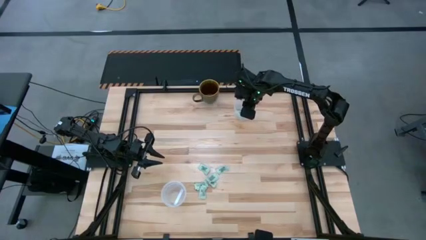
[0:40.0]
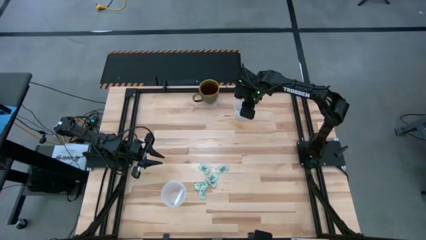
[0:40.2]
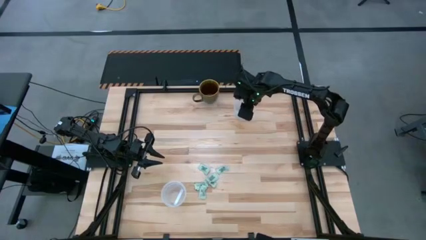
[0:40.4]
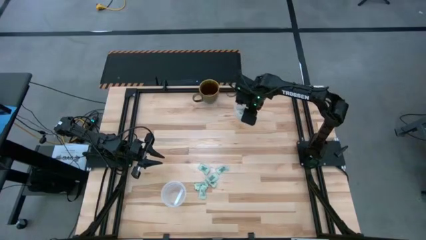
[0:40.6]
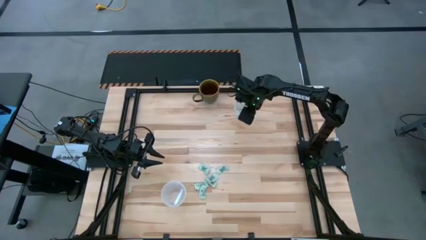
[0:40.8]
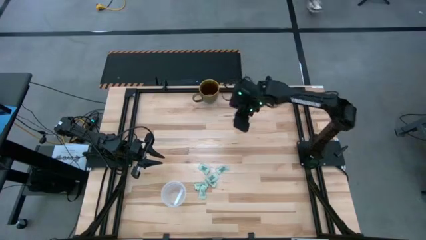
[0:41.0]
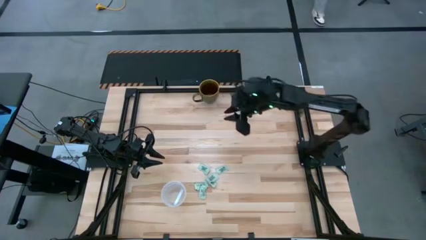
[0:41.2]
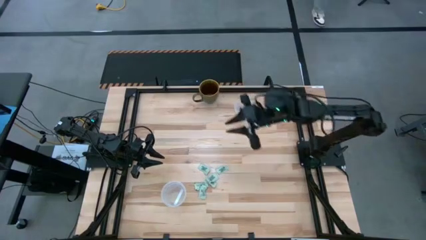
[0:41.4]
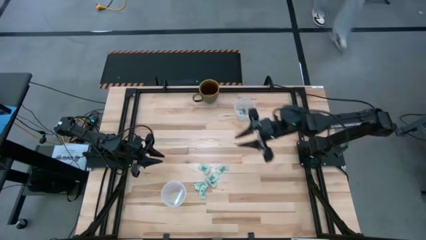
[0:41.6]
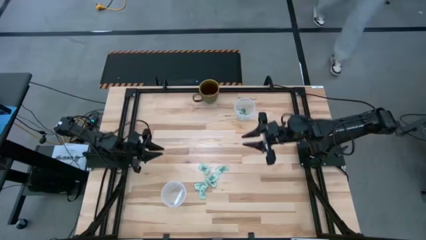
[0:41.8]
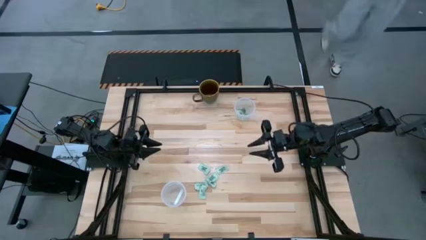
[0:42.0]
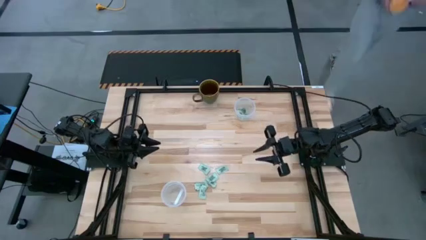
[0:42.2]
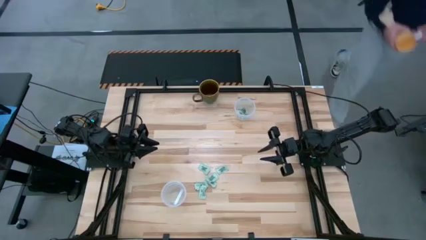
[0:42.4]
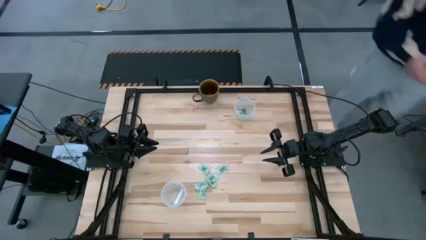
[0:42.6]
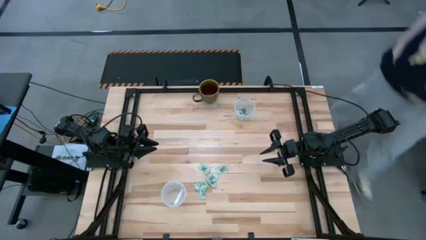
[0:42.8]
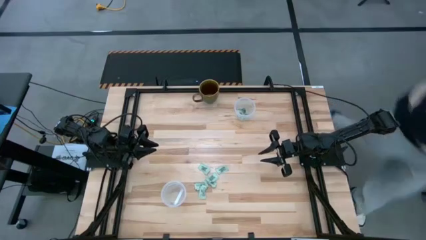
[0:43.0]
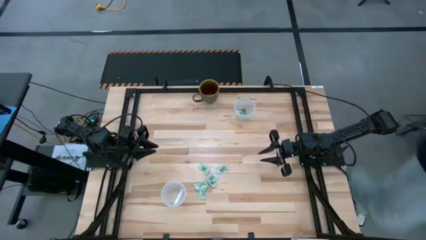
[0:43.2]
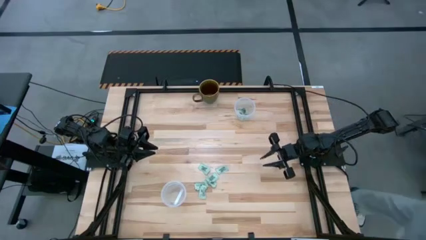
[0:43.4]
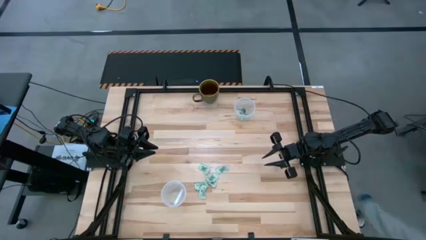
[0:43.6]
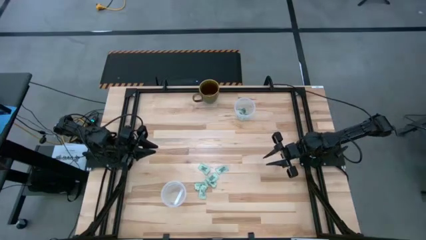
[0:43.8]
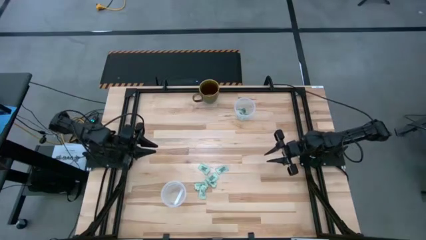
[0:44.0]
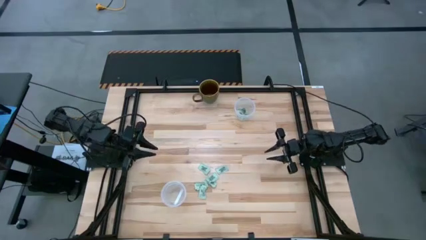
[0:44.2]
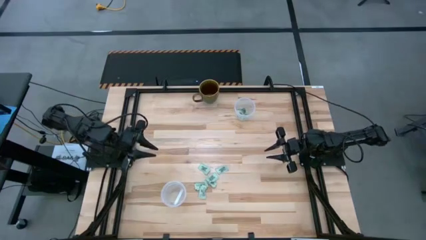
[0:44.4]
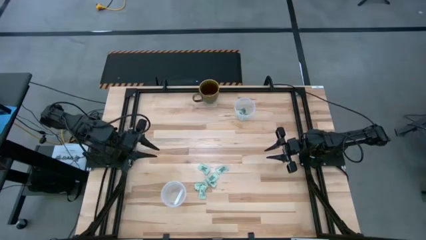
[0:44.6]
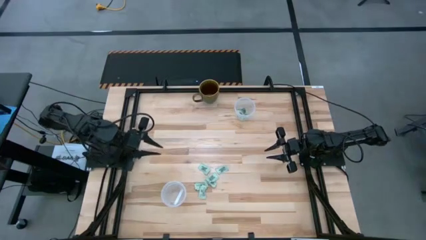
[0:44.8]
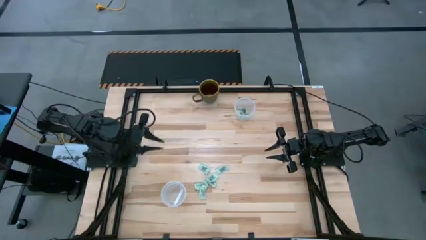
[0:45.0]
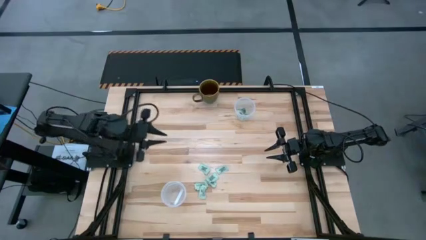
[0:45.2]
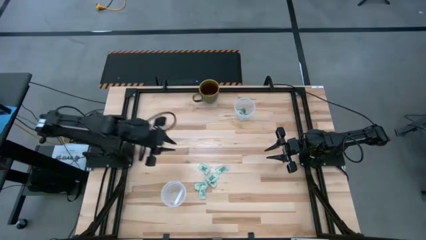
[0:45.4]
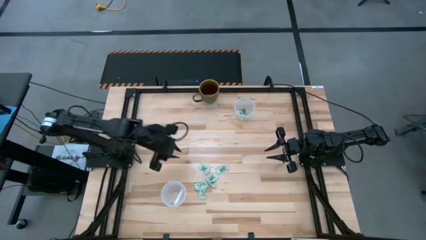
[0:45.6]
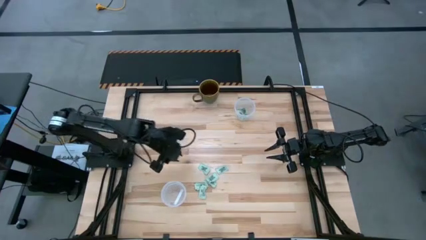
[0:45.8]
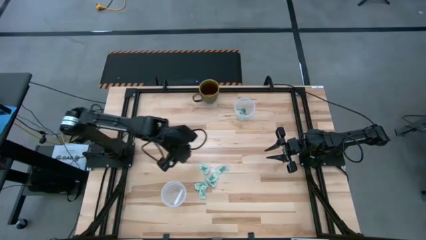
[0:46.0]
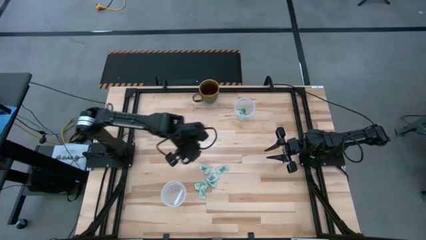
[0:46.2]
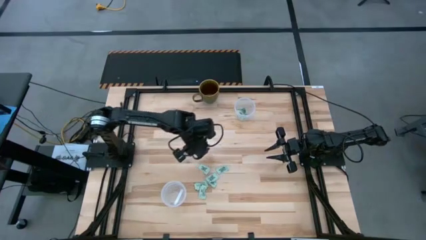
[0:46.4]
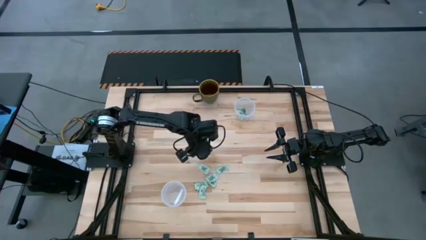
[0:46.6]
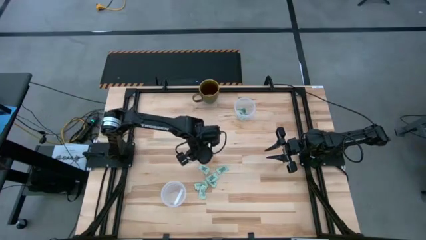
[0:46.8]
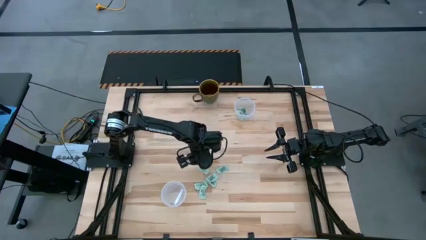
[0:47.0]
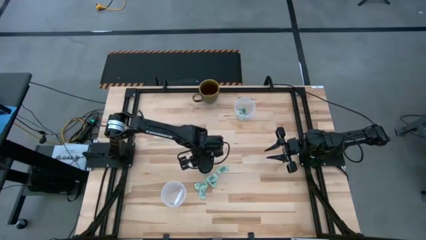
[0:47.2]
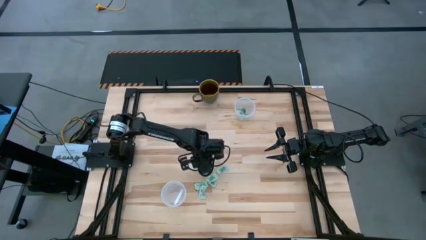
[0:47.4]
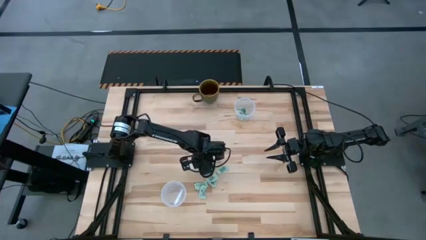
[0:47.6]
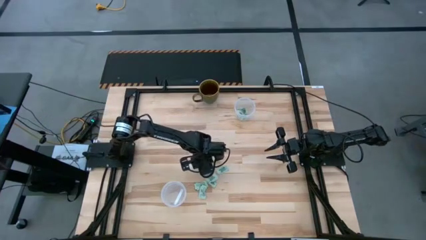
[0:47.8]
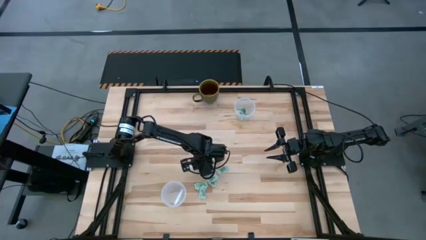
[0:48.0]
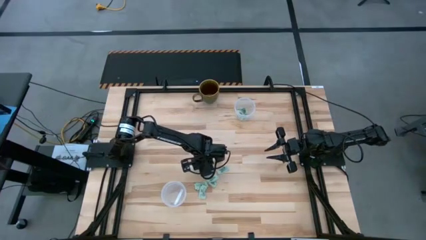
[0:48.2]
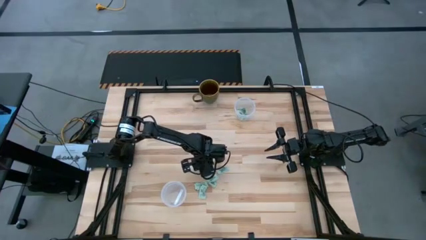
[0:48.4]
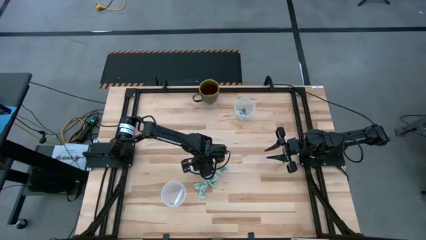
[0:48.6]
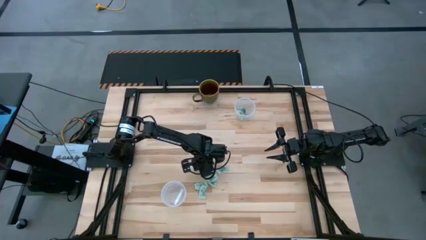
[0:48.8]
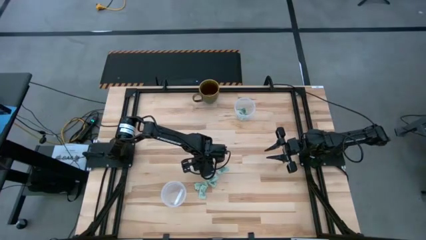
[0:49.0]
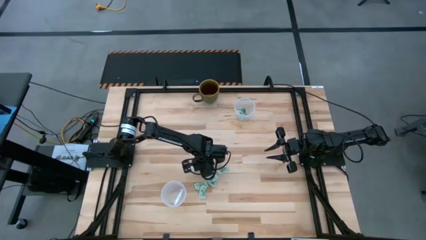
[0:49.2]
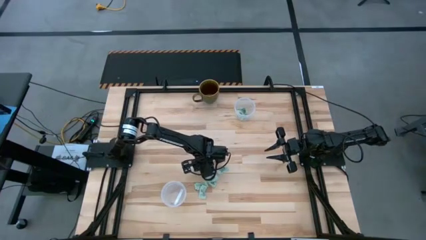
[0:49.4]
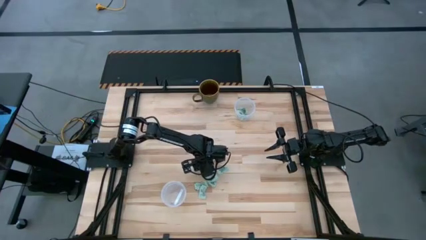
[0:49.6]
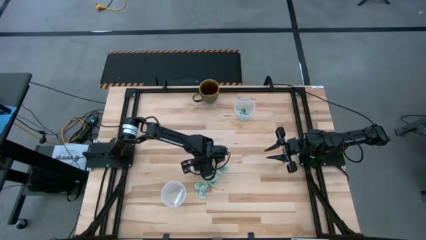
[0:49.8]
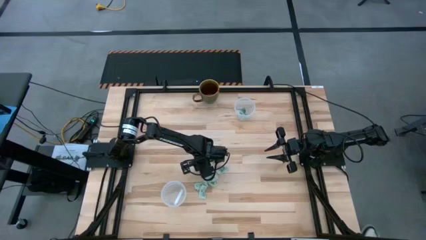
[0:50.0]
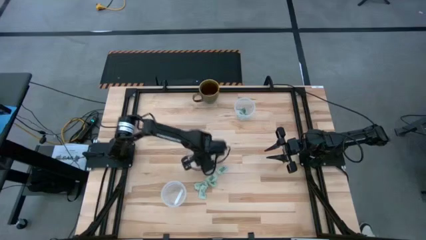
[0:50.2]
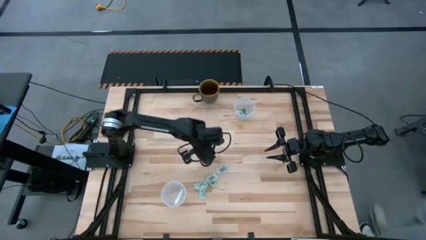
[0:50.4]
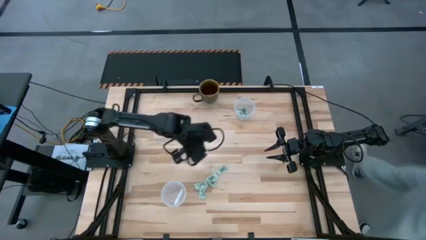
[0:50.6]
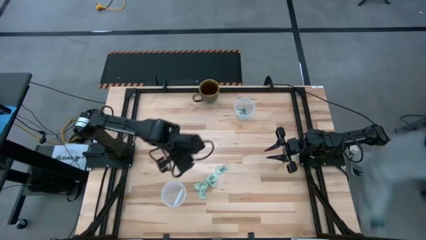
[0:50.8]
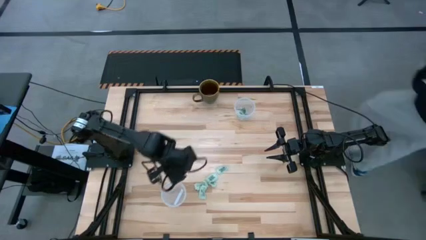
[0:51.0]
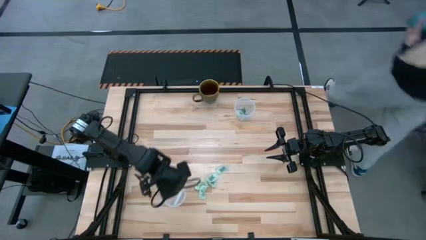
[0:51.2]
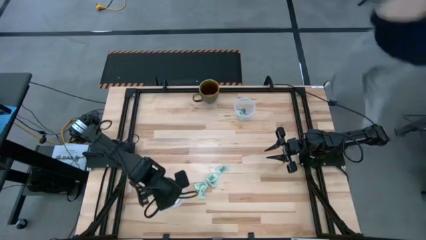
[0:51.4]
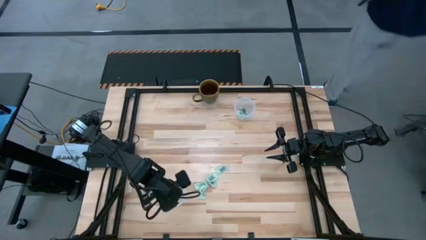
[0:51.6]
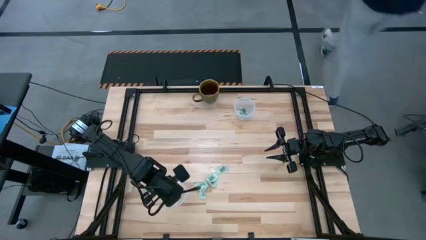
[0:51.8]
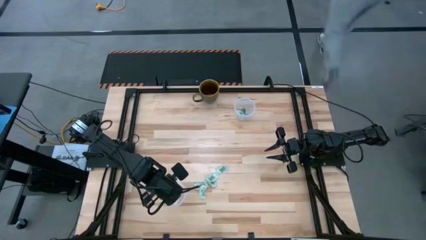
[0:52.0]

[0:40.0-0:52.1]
Task: Pick and place items into bin
Put the stevia packet into the bottom transparent bin

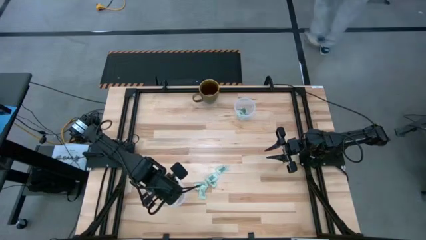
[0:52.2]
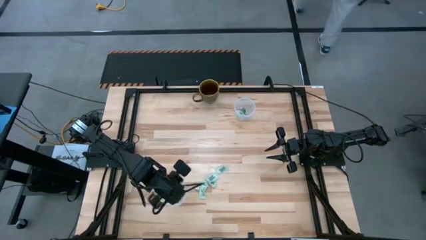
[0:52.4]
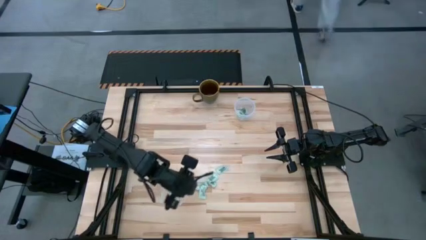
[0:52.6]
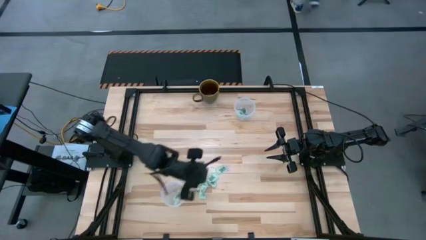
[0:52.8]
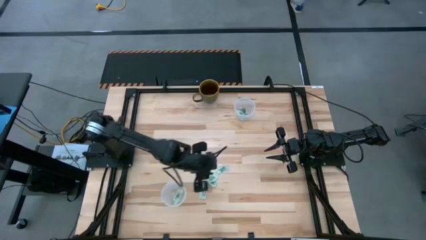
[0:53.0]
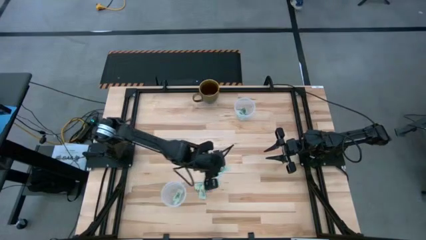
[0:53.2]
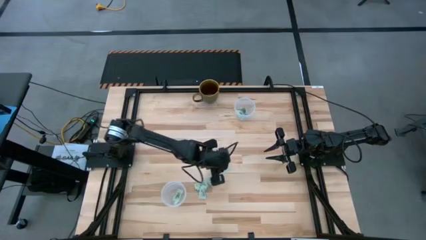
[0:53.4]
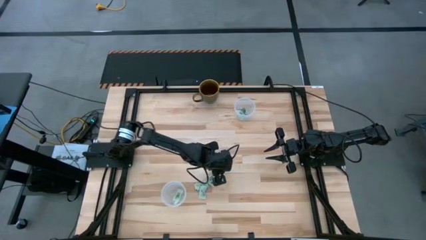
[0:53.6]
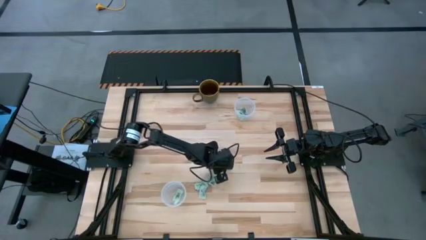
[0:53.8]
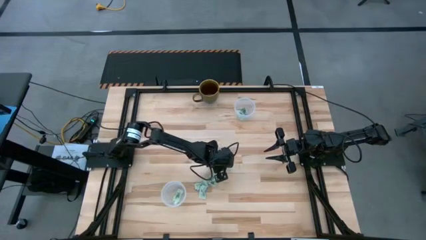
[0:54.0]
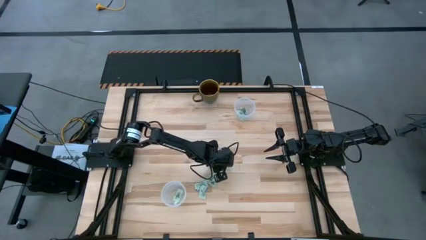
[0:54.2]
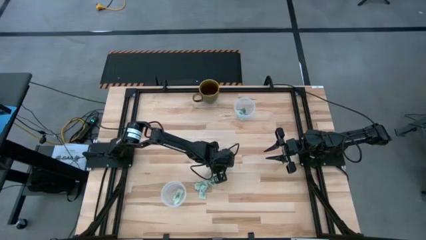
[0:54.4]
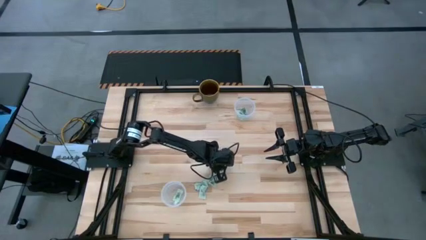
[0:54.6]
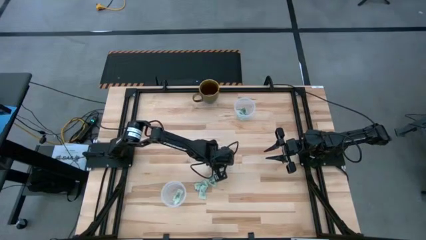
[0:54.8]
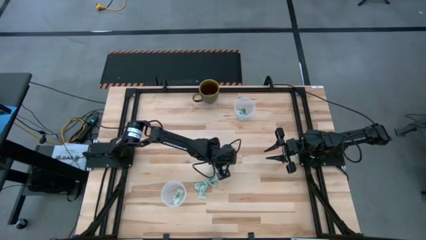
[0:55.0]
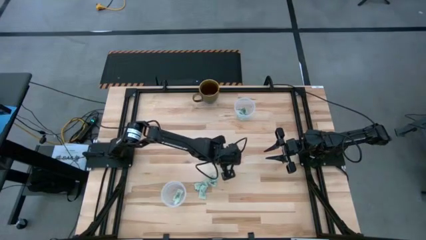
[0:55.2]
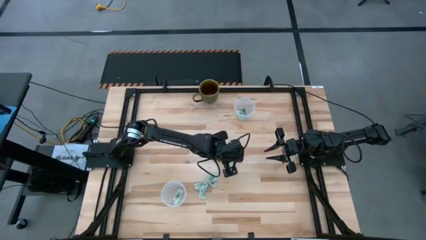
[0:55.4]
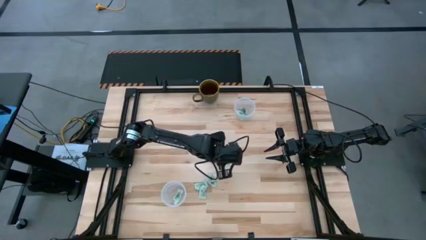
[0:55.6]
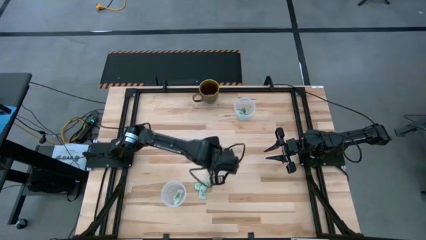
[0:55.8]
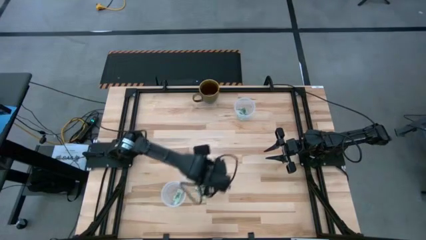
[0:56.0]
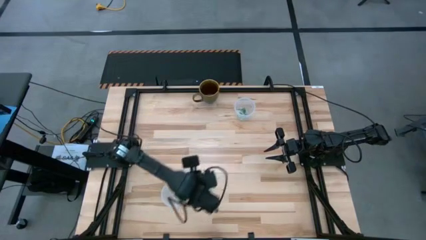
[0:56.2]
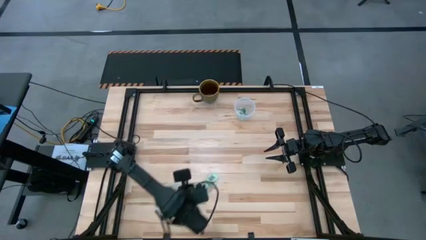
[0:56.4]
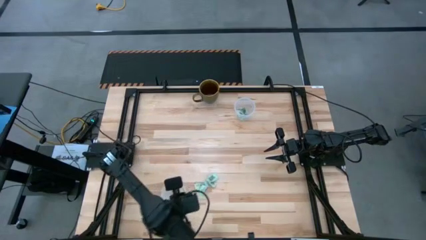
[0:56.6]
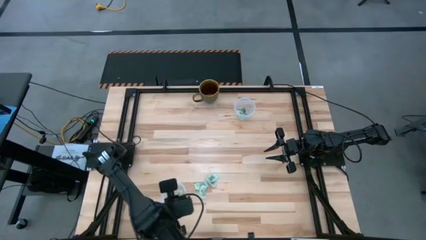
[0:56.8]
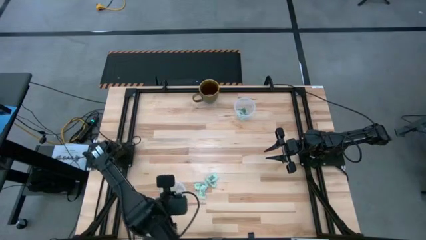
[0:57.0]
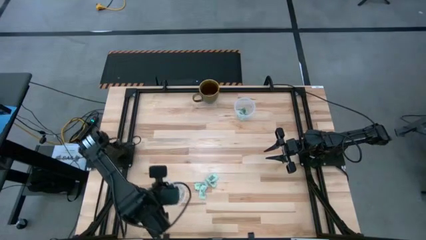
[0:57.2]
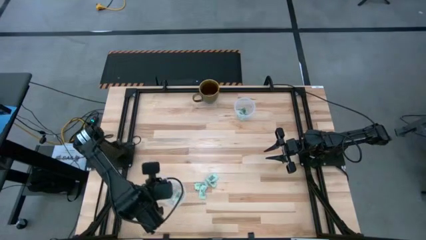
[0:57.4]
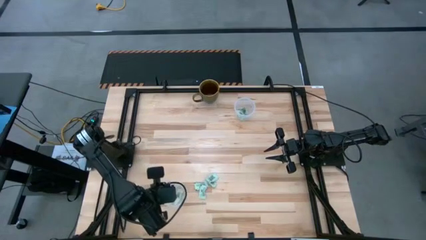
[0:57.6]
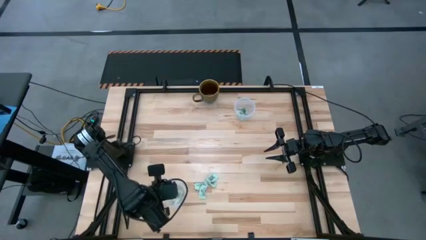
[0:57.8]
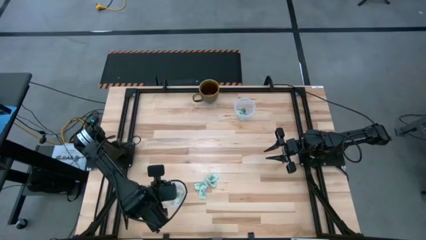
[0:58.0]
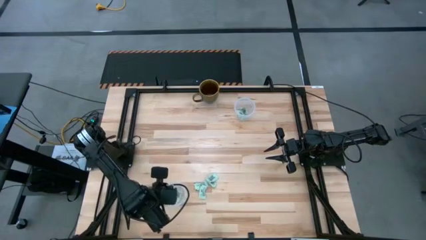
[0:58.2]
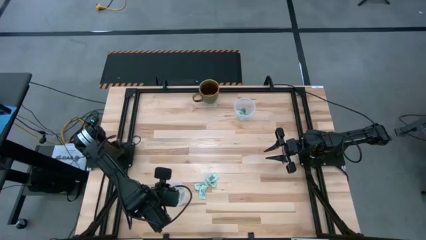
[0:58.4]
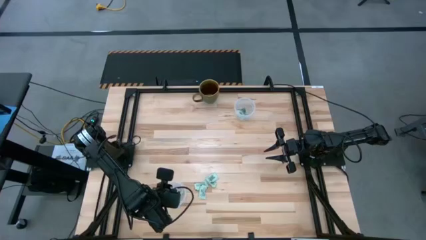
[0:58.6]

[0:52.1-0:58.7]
Put the stevia packet into the bottom transparent bin
